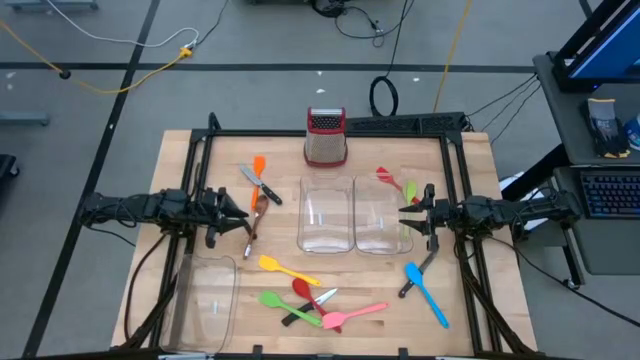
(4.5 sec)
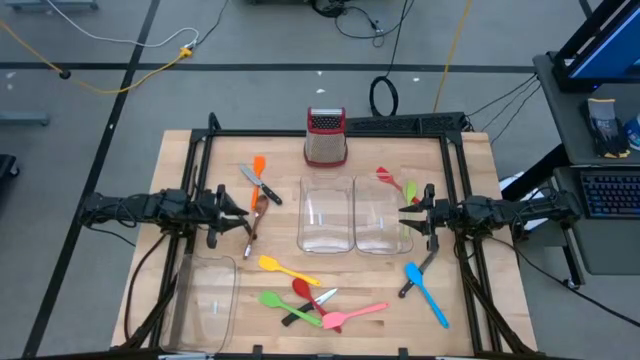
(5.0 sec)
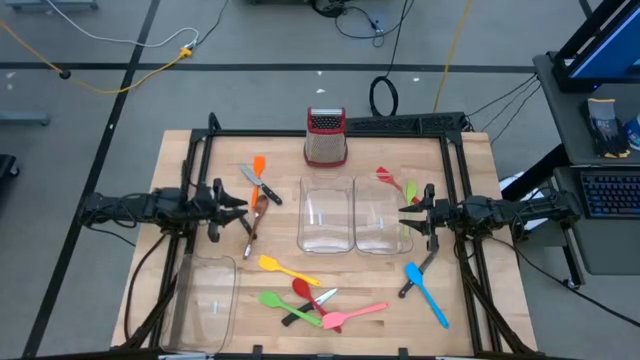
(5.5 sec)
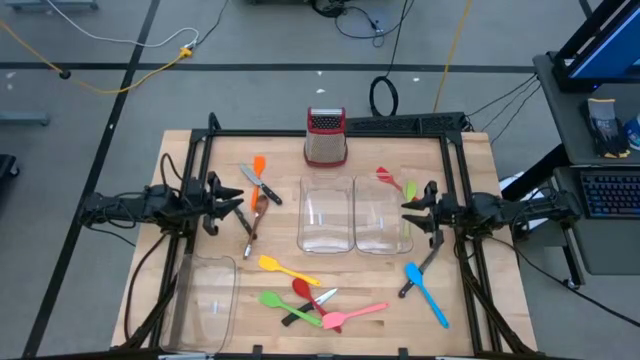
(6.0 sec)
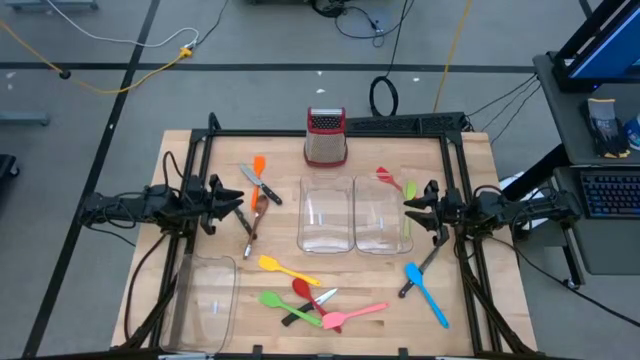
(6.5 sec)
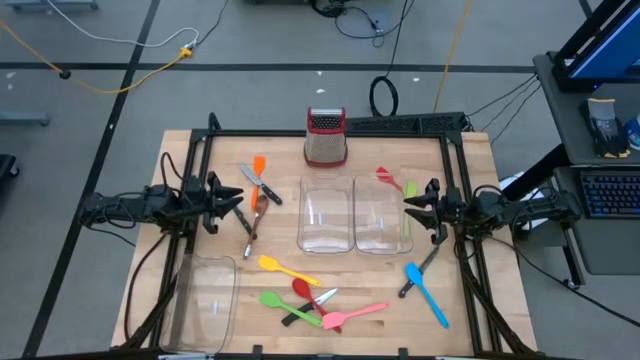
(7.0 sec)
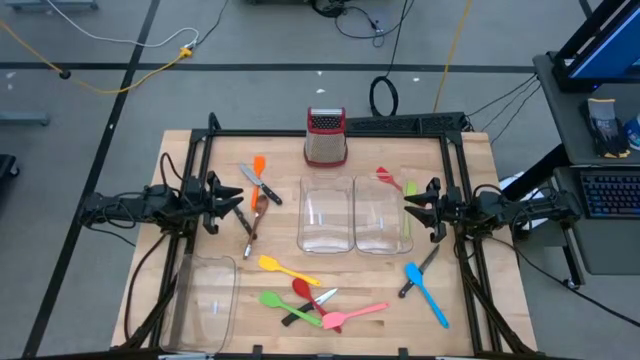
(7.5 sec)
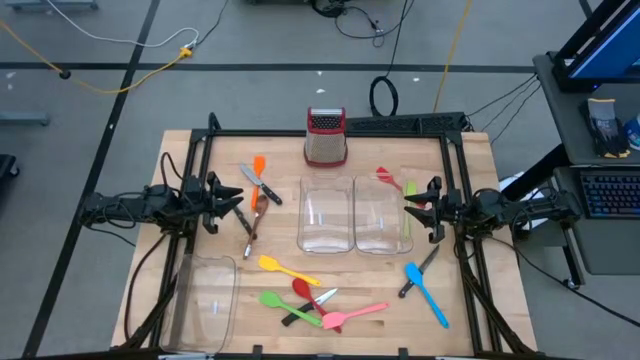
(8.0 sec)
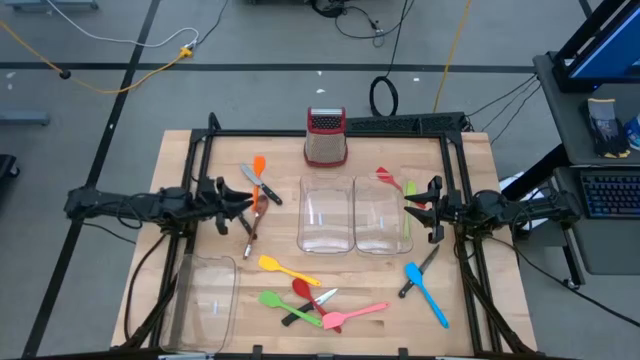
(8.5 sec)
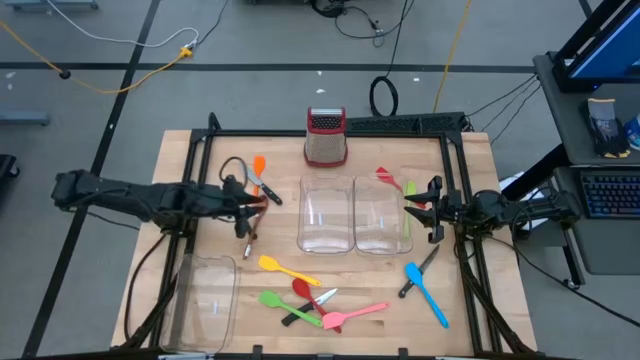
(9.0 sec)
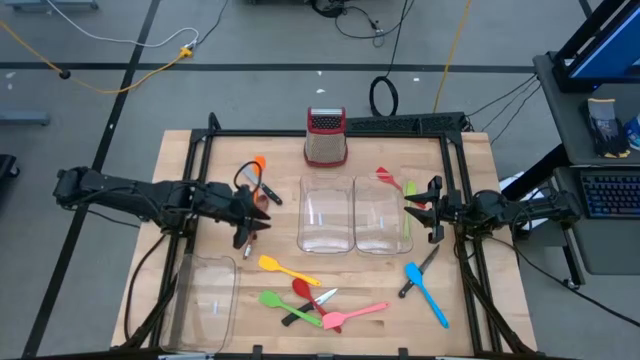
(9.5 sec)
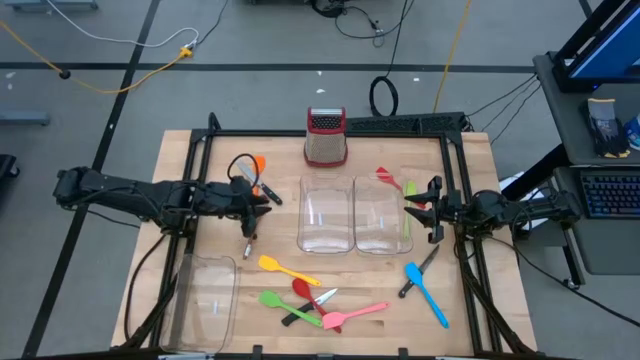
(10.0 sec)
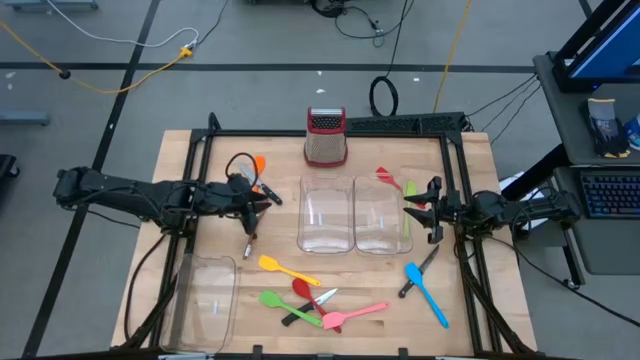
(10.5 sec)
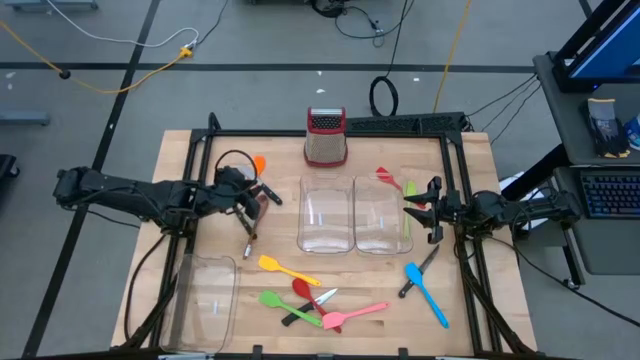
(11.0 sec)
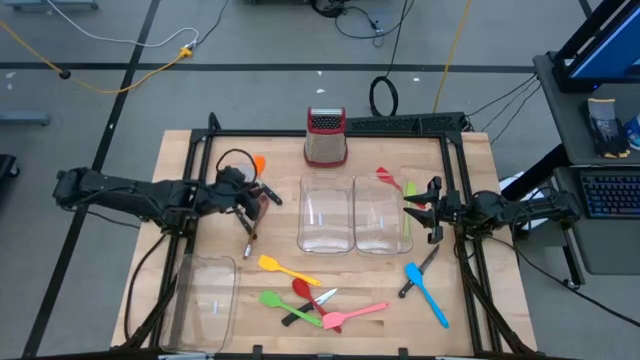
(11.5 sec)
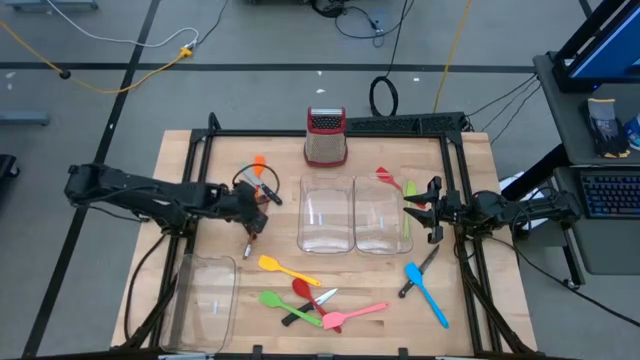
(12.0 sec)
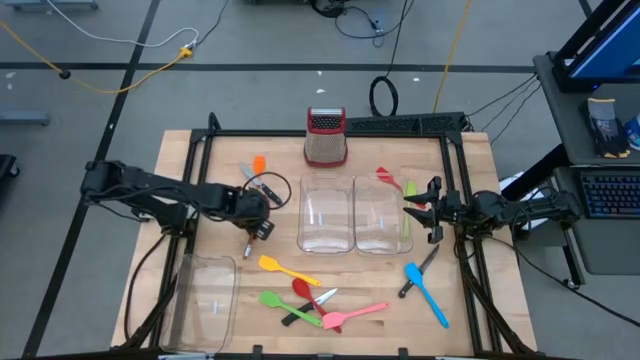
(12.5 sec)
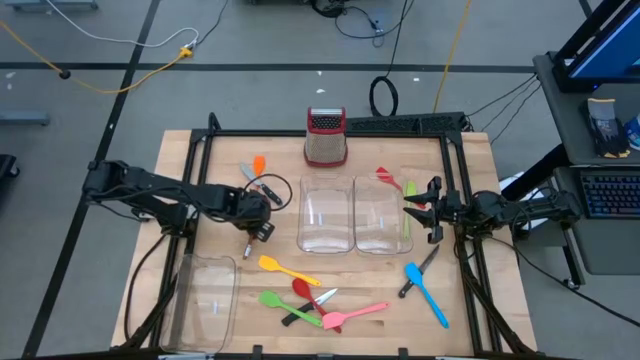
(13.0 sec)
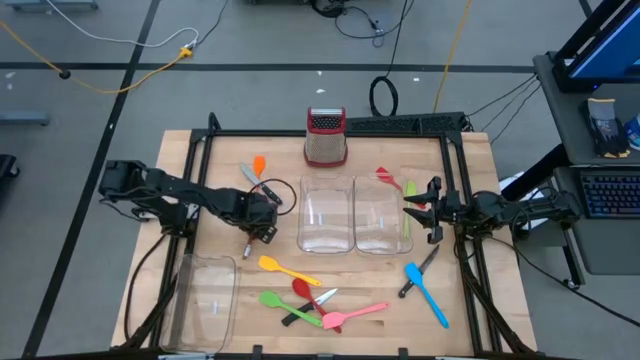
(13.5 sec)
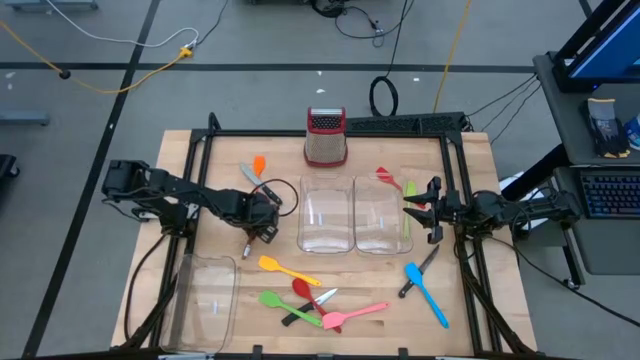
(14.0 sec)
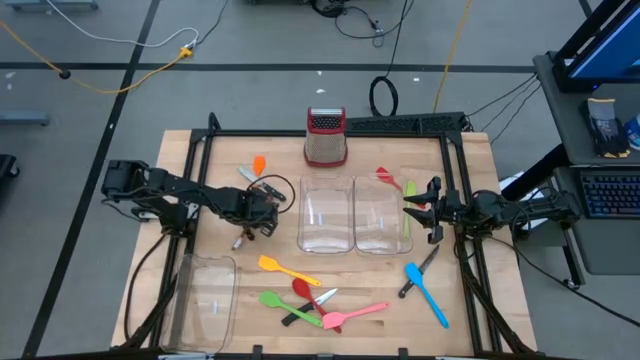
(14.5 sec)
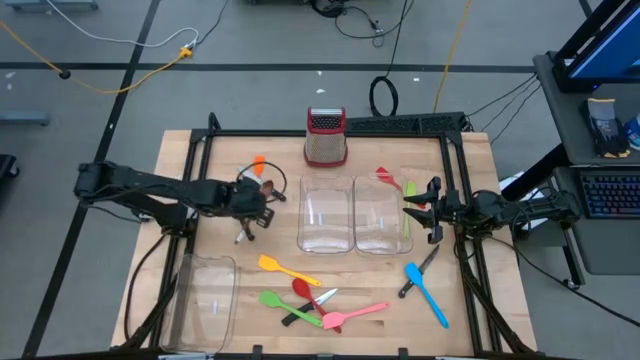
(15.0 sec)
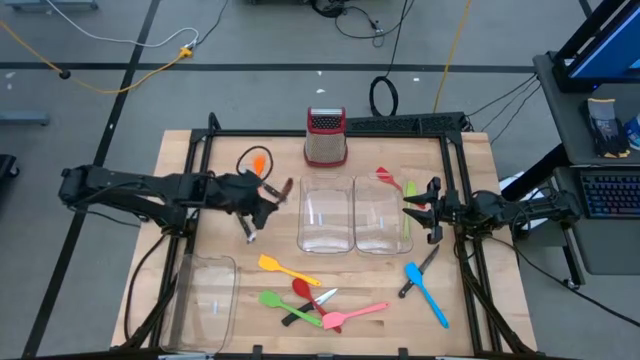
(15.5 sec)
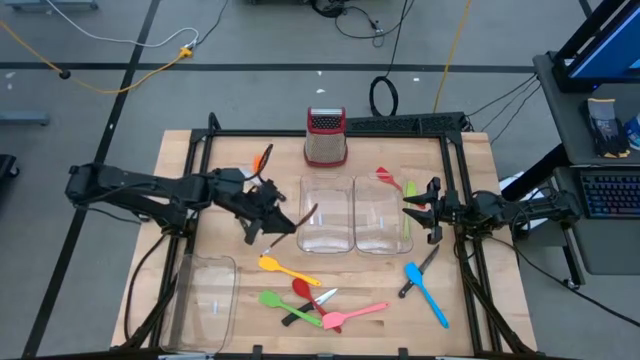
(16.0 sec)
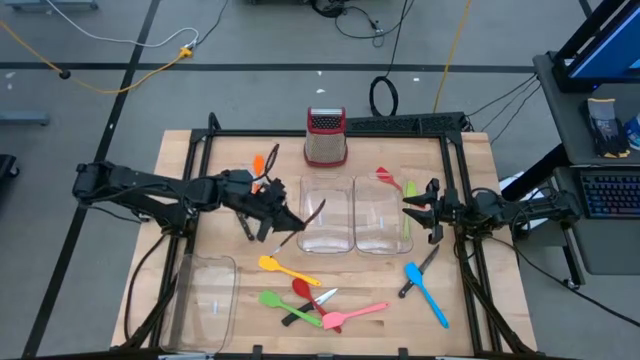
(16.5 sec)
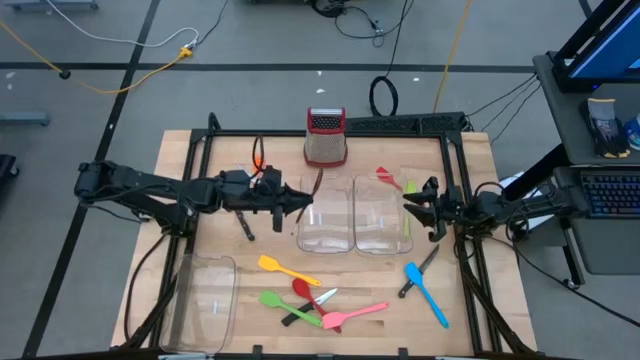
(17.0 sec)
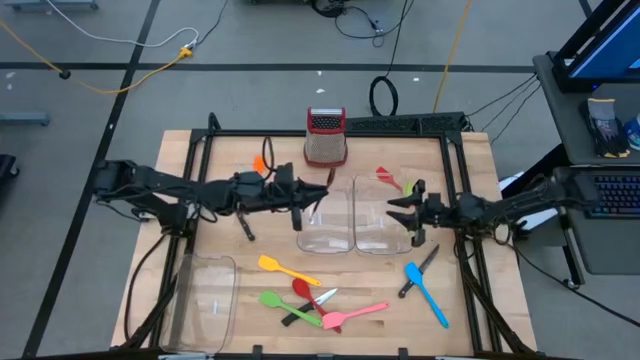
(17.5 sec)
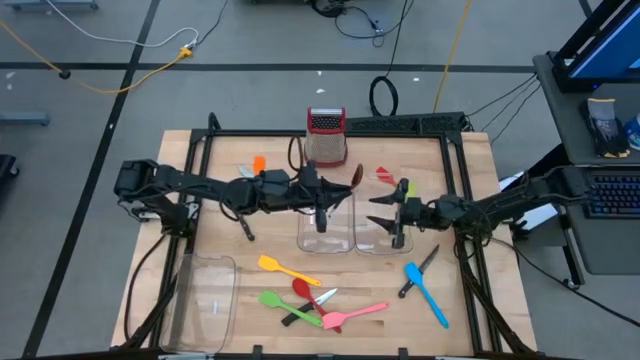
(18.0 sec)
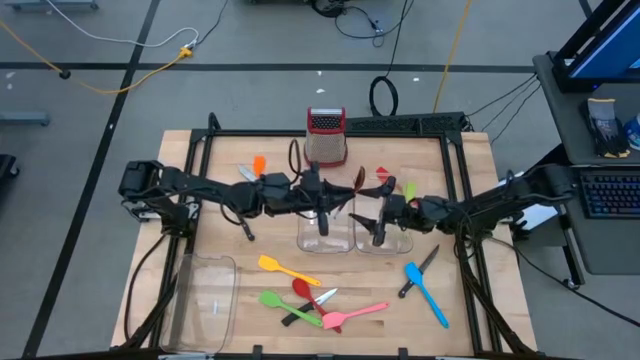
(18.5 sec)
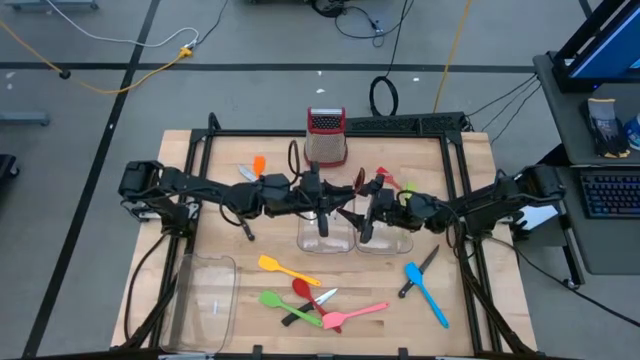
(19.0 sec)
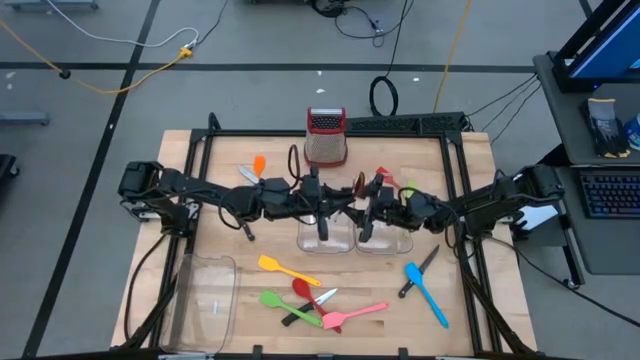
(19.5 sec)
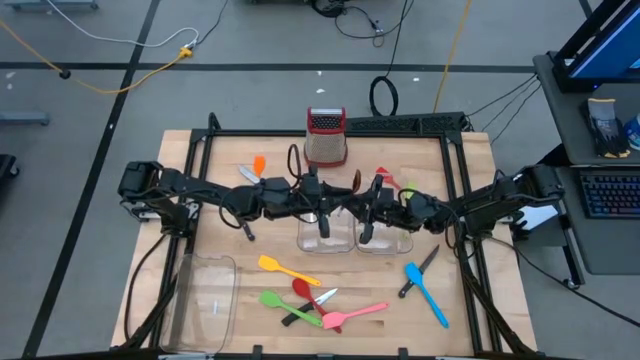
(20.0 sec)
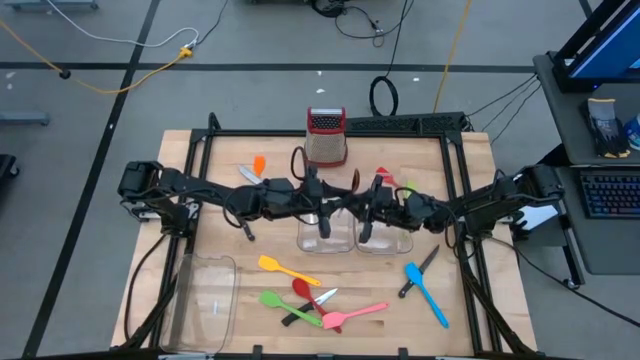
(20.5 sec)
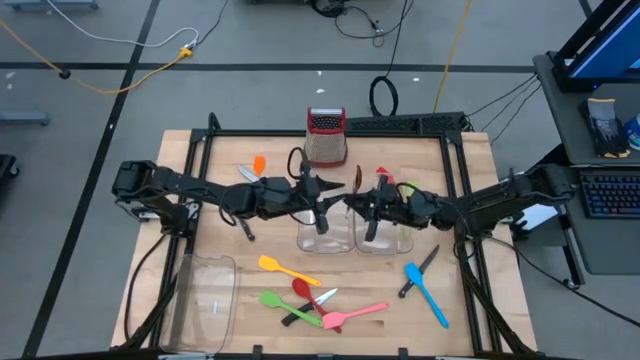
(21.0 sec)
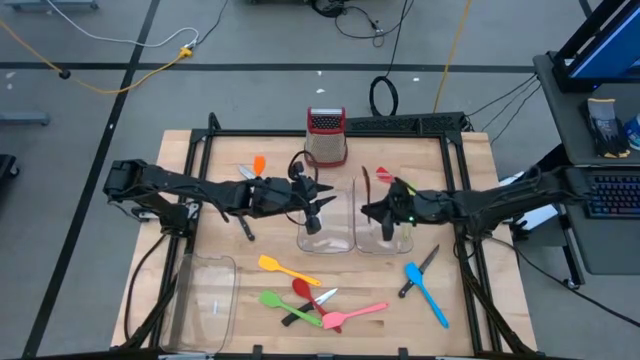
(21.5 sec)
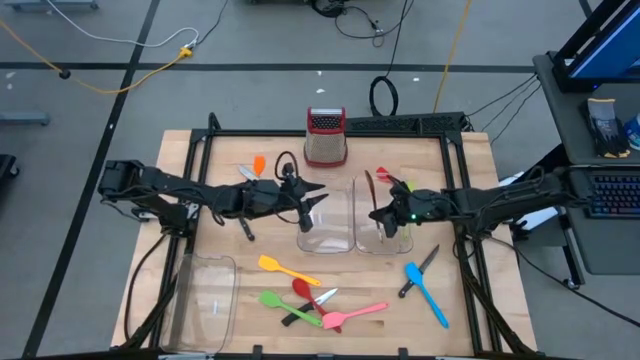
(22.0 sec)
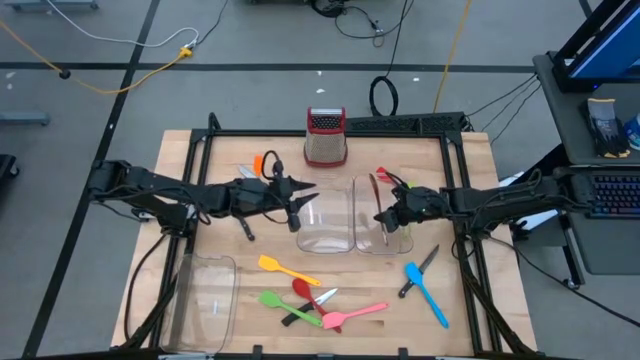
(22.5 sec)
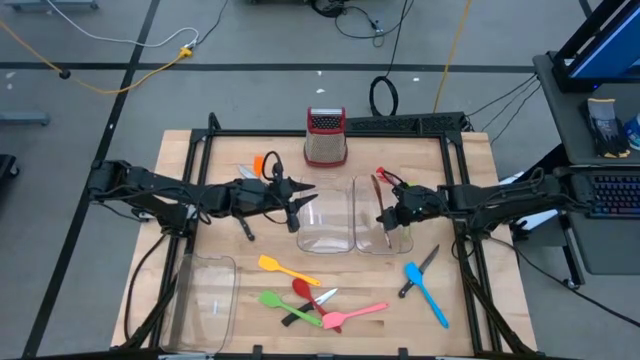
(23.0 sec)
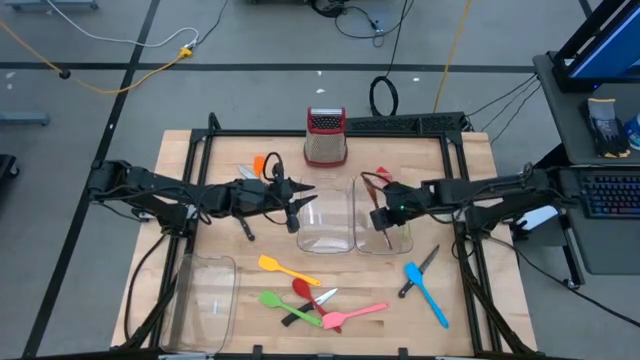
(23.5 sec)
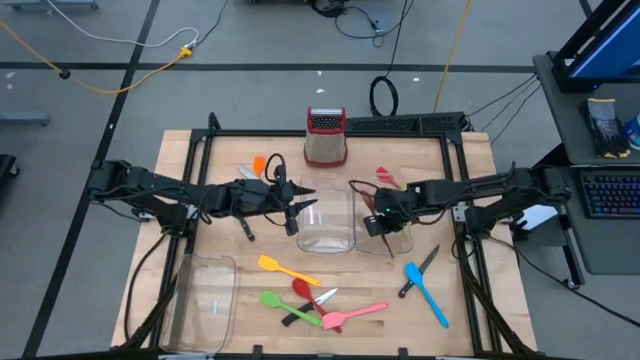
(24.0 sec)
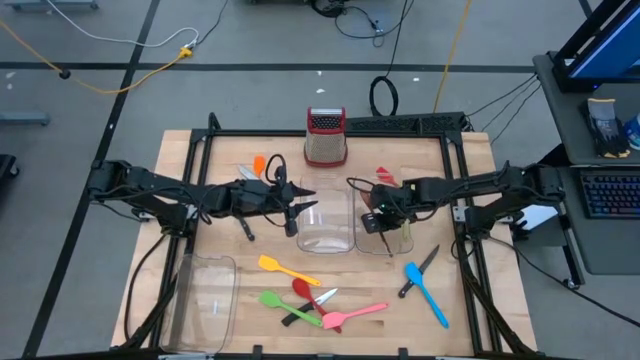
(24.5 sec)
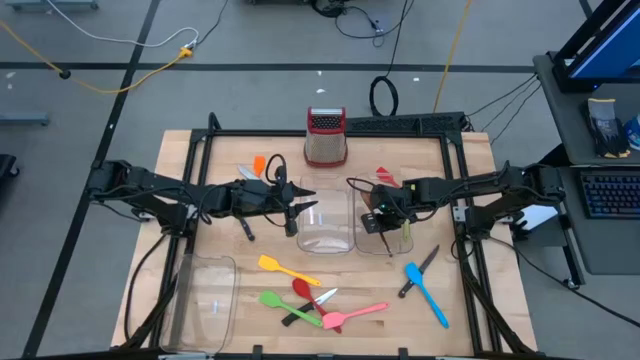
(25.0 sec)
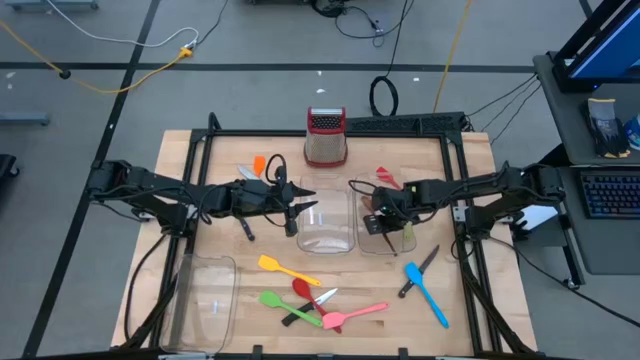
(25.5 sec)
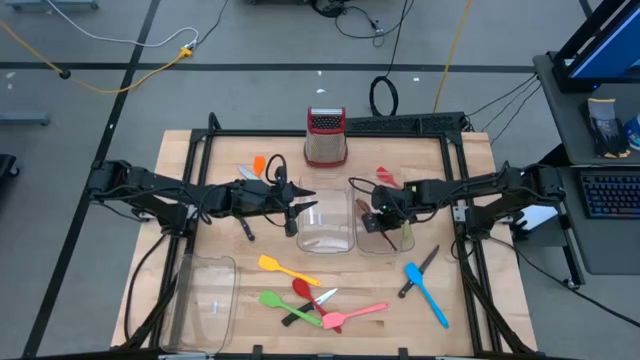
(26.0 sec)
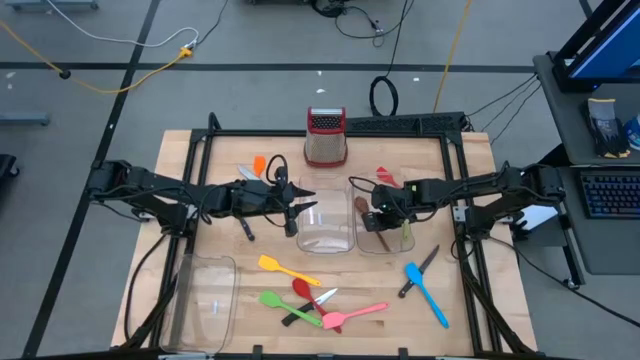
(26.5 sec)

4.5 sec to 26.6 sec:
Task: Pick & Place Kitchen Items
Put the brown serving spoon into the right transparent bin
